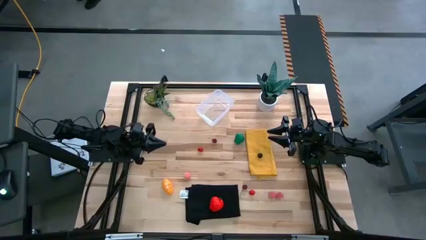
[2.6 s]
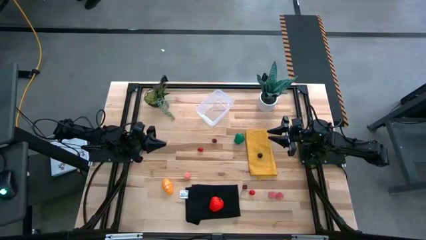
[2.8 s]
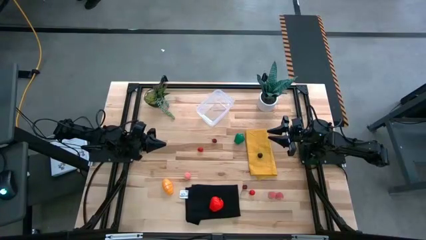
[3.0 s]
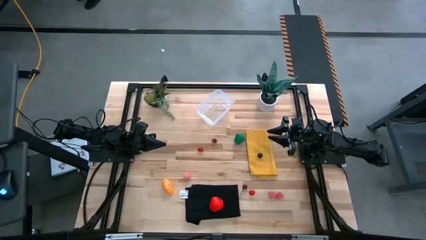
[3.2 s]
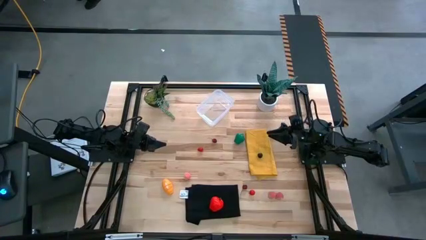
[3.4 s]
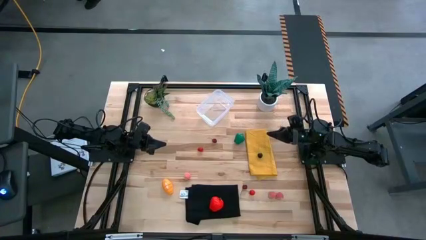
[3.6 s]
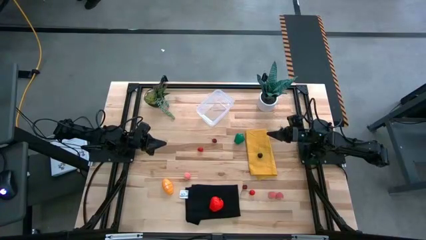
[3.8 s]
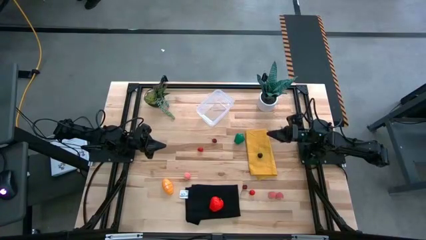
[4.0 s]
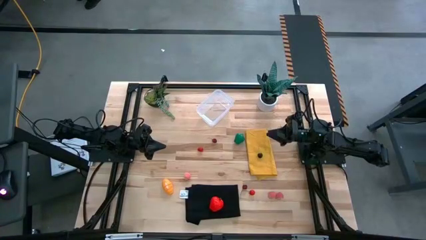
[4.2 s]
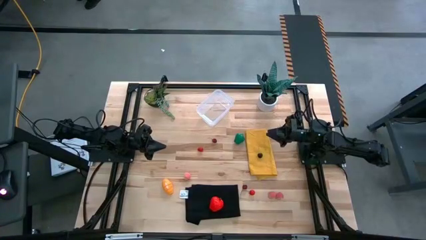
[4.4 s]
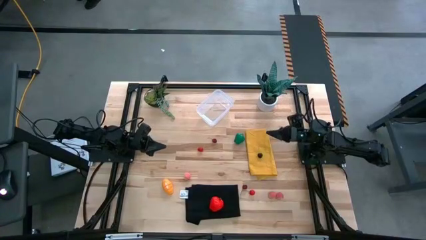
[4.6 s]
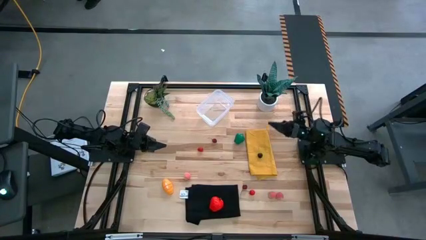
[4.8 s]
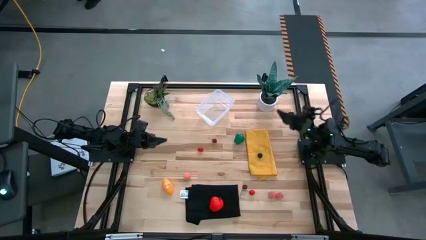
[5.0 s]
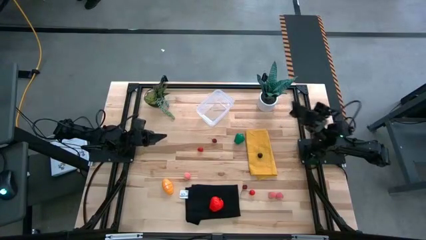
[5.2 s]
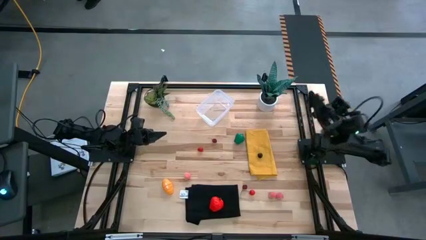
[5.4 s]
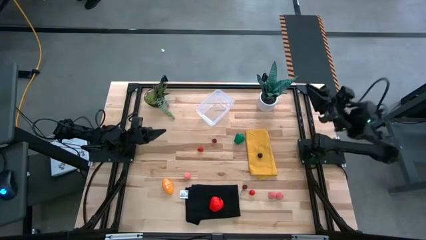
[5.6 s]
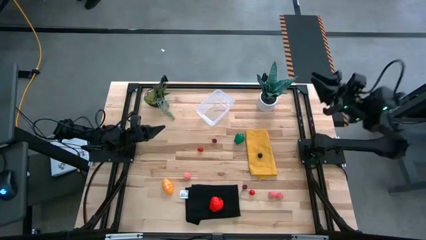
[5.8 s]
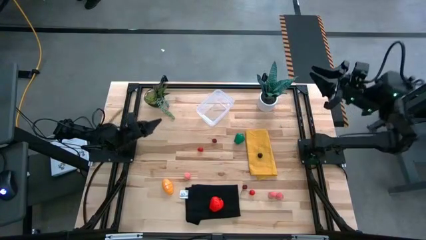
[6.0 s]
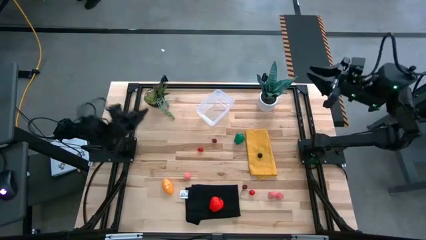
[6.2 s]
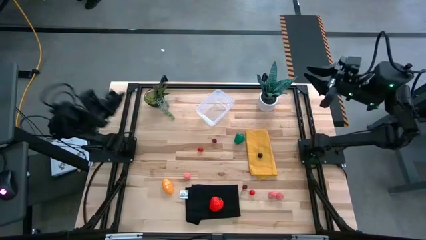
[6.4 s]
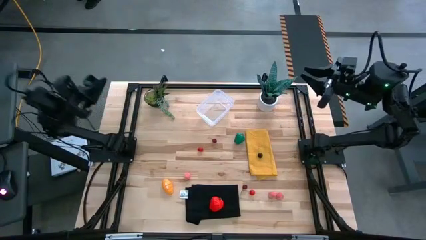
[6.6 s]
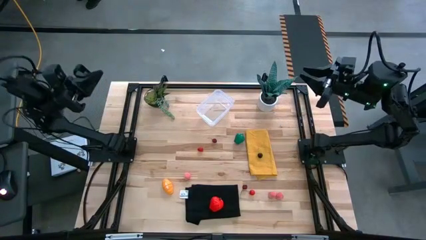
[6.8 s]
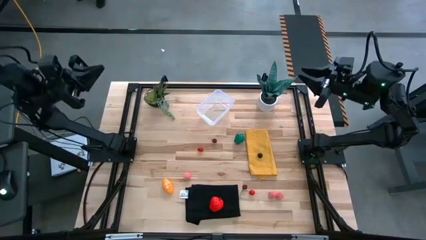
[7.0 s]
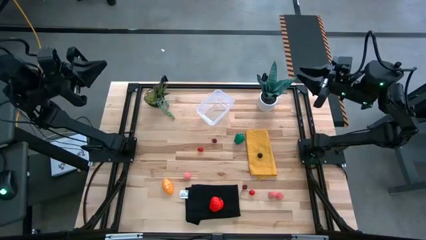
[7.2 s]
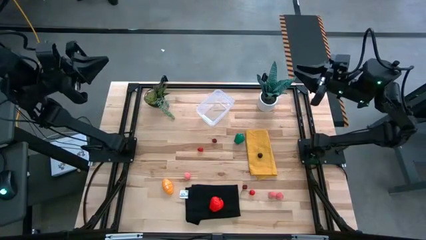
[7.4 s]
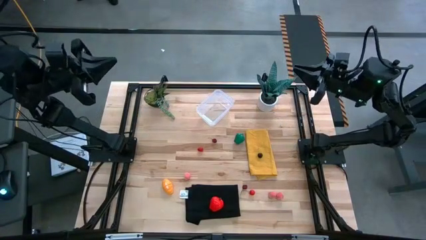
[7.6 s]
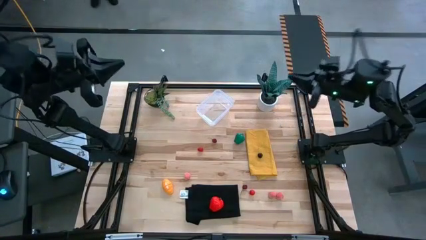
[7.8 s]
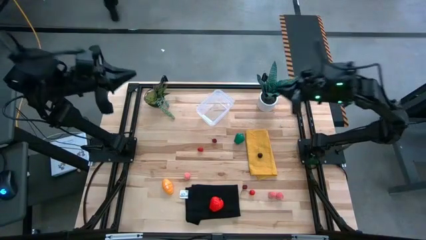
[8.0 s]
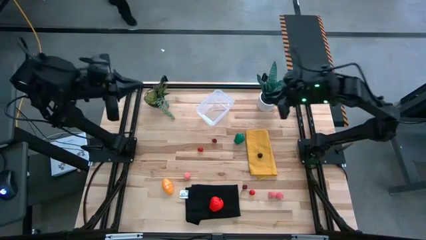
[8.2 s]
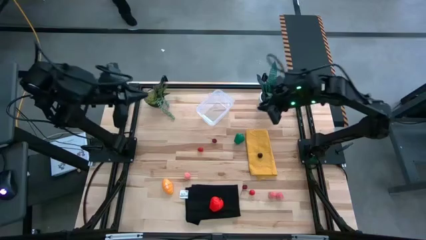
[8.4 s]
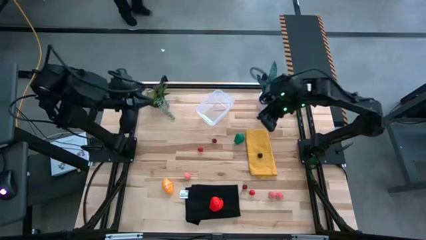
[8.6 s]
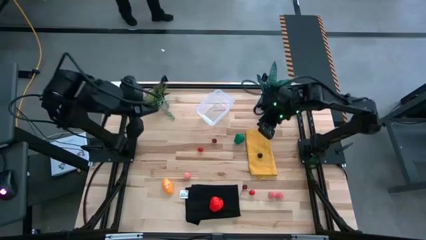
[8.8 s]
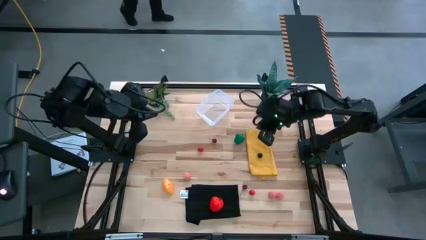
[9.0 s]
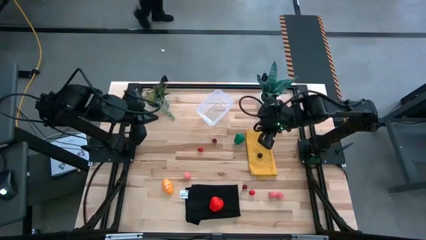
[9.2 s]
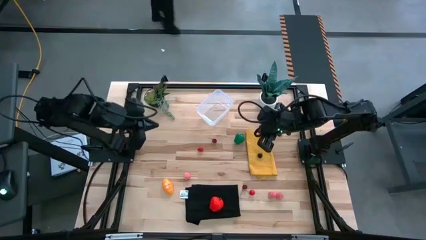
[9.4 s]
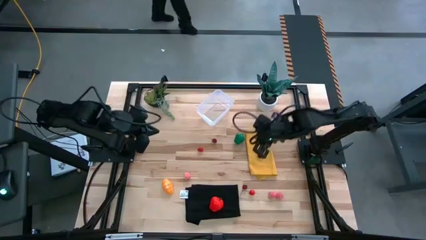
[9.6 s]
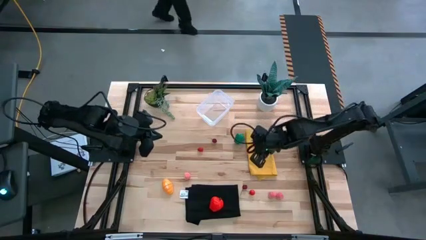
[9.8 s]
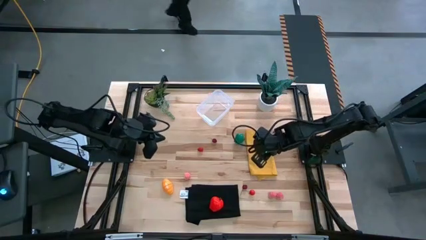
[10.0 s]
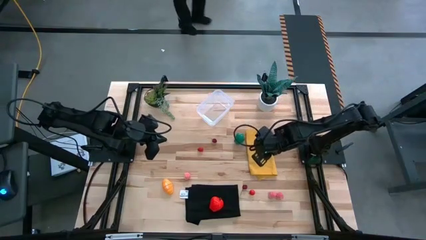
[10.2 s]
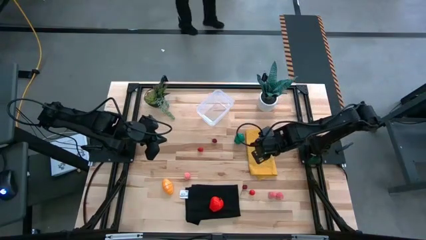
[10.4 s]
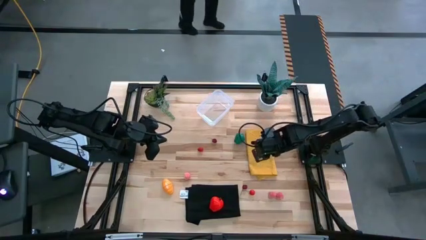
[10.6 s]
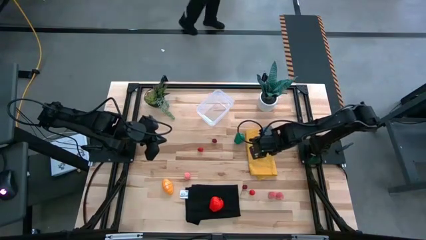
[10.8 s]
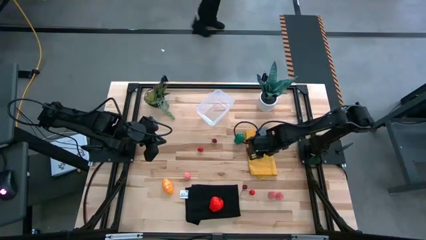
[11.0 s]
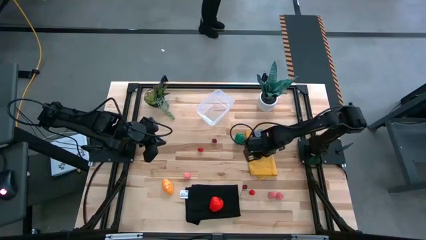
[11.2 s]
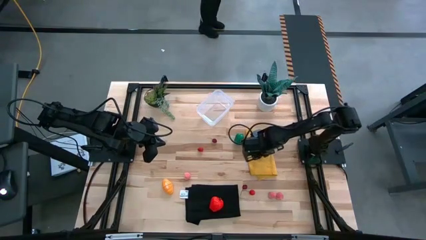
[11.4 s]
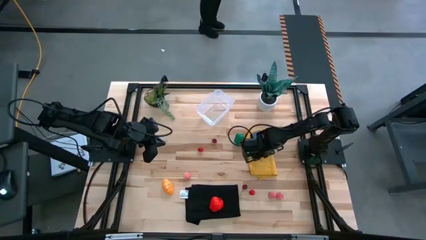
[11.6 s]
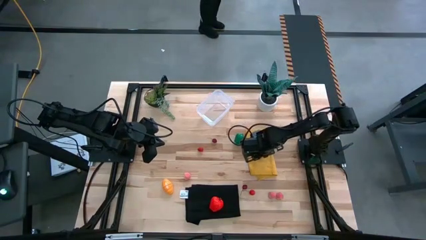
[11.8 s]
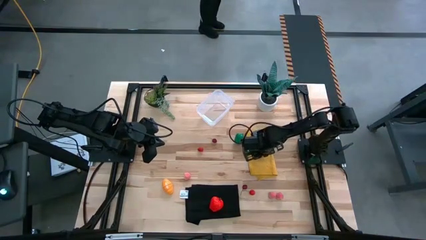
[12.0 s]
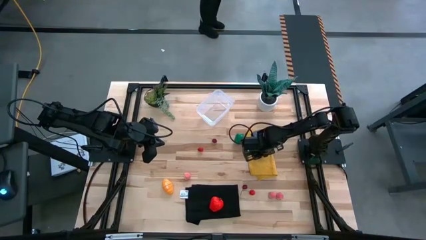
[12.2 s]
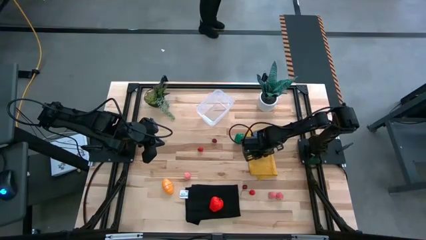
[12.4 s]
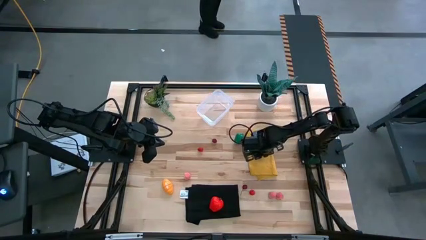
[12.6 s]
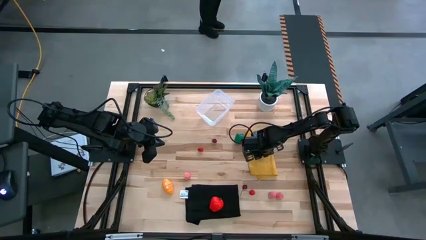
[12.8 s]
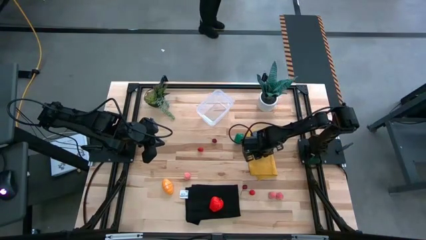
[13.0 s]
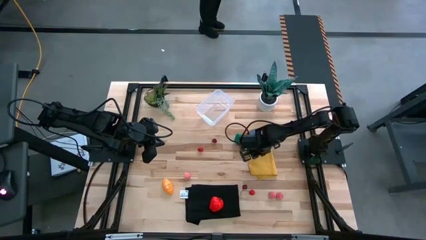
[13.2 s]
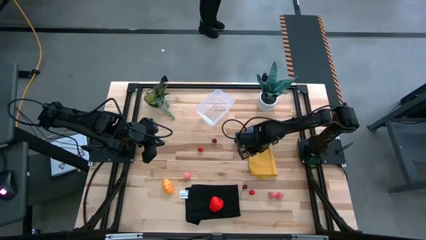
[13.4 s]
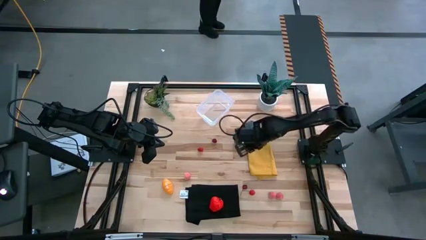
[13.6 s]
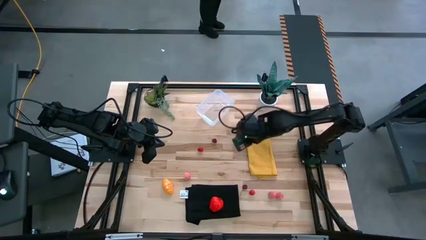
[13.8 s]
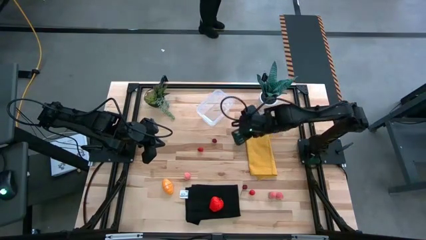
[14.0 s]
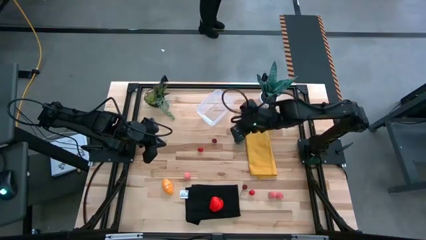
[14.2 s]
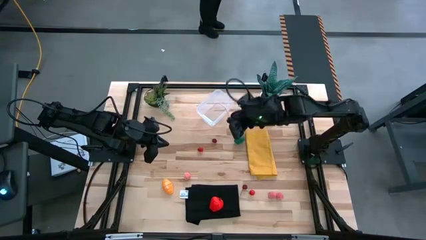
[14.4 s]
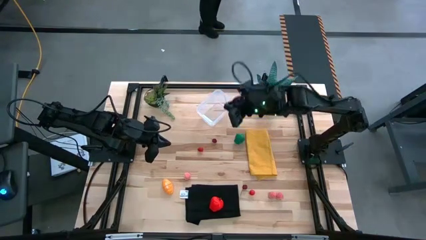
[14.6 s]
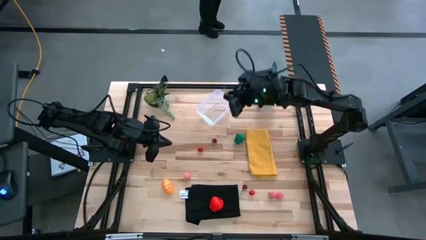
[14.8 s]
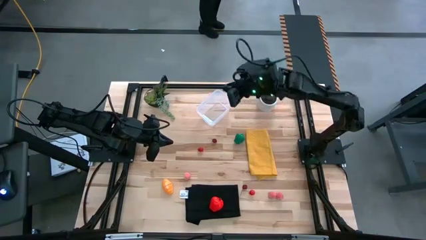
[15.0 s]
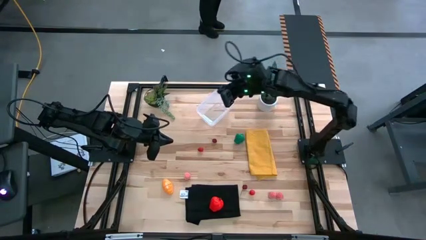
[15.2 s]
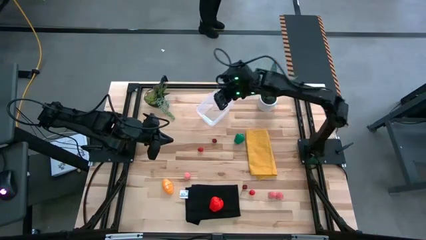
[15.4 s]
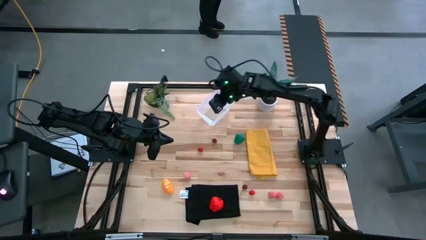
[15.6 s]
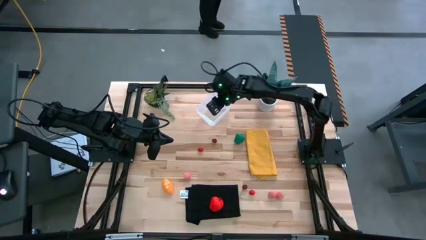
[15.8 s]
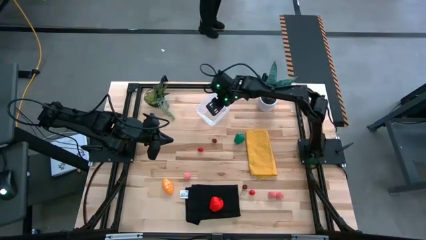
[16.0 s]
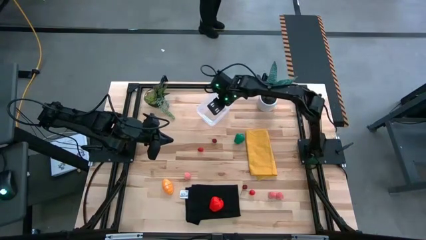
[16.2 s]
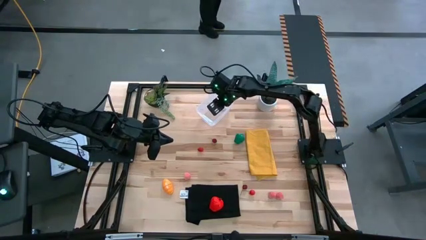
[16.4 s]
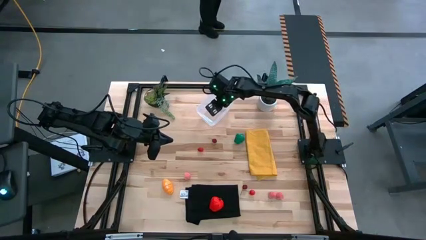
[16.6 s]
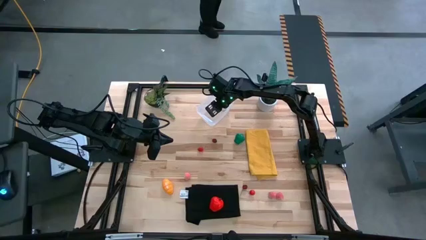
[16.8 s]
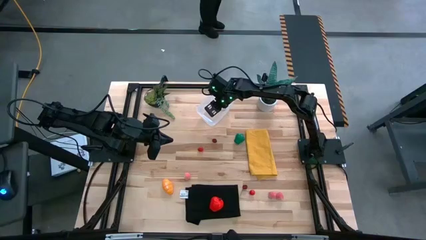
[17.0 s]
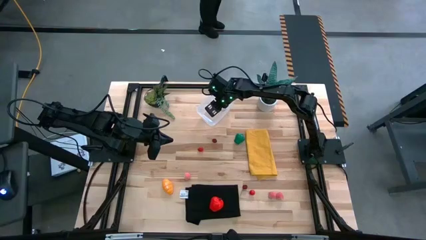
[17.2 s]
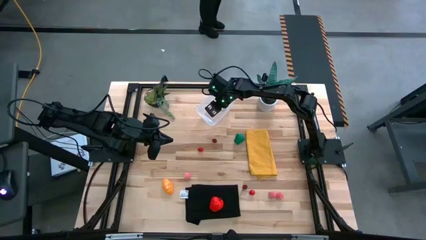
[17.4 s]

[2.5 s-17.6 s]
Task: Pick and placing Produce into tupperware
Put the black cherry into the transparent bin
